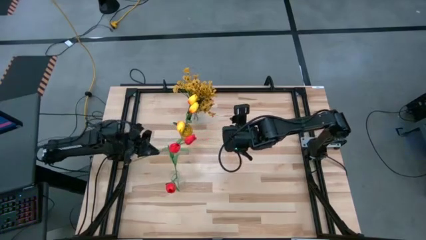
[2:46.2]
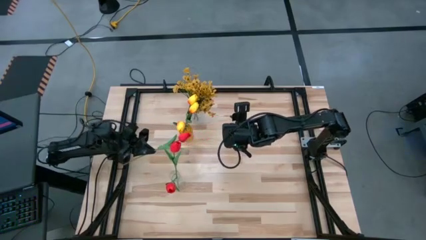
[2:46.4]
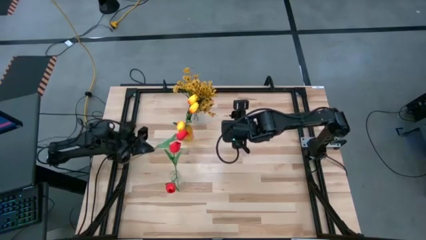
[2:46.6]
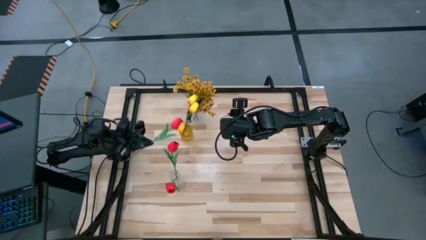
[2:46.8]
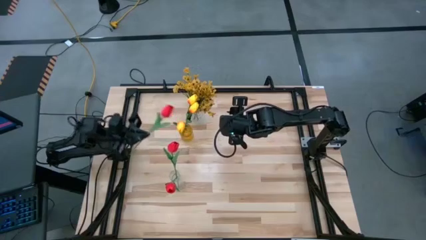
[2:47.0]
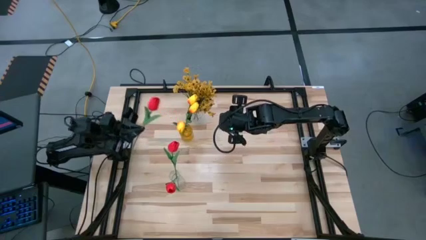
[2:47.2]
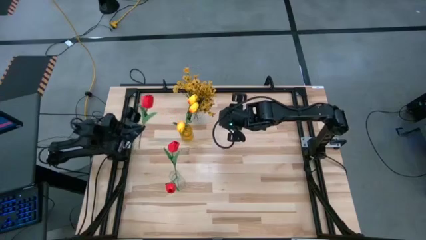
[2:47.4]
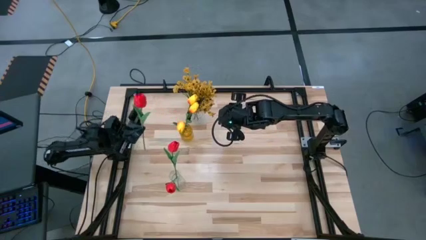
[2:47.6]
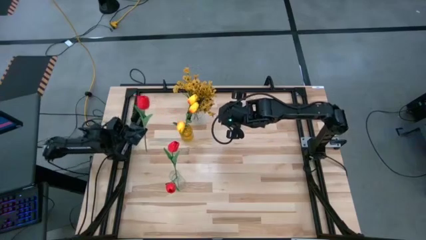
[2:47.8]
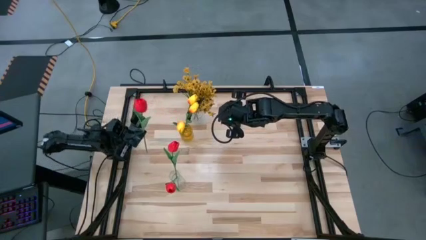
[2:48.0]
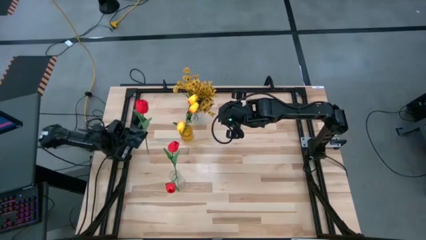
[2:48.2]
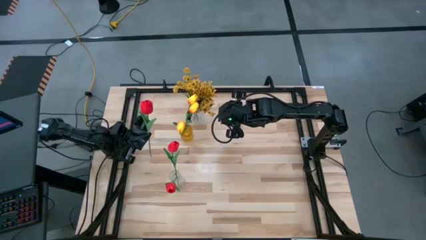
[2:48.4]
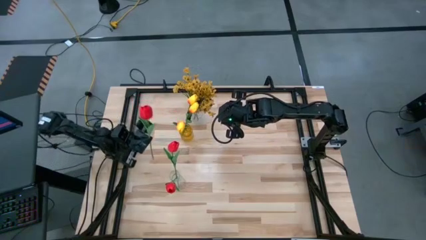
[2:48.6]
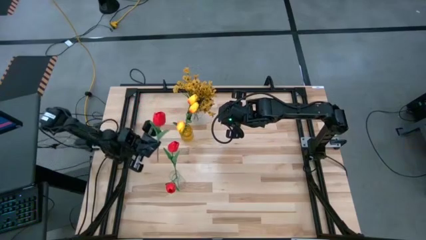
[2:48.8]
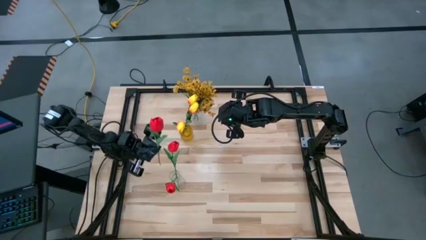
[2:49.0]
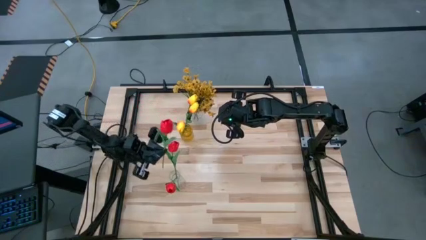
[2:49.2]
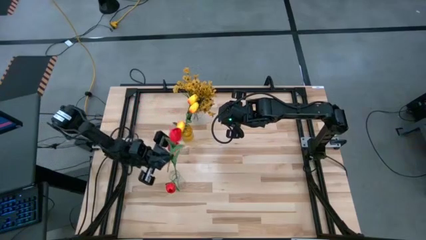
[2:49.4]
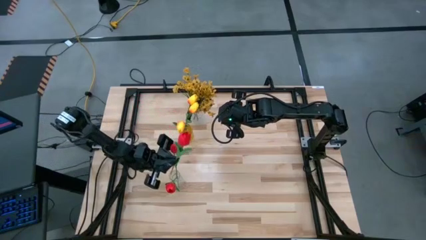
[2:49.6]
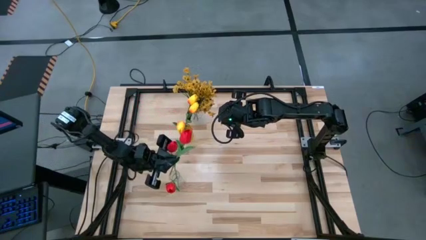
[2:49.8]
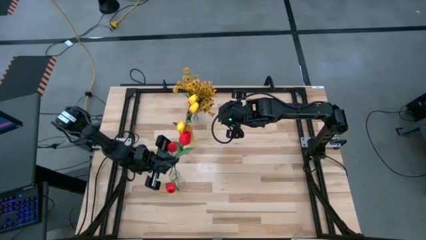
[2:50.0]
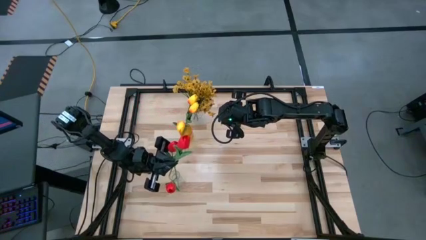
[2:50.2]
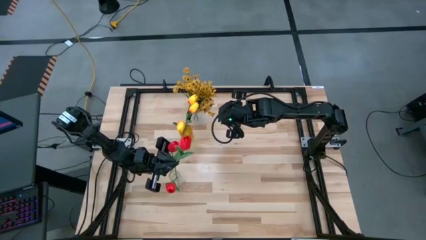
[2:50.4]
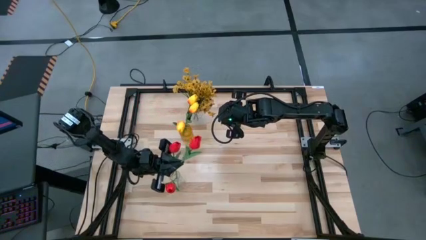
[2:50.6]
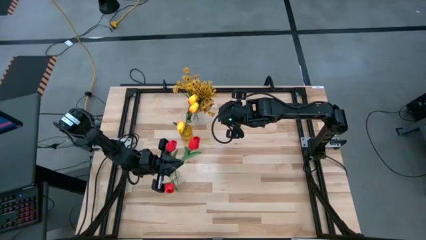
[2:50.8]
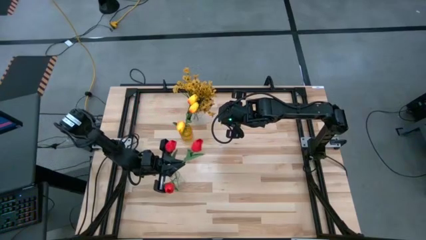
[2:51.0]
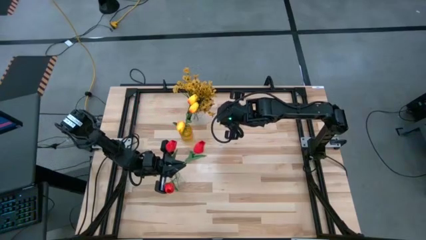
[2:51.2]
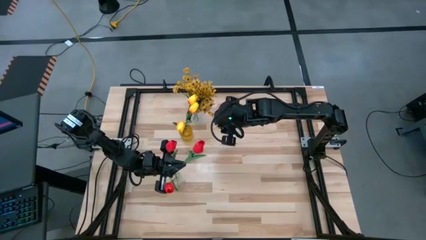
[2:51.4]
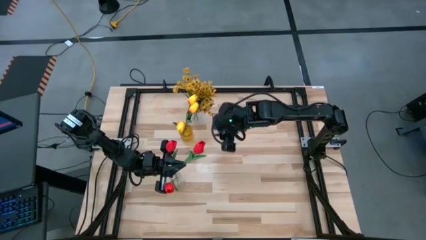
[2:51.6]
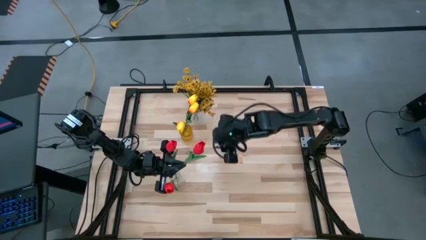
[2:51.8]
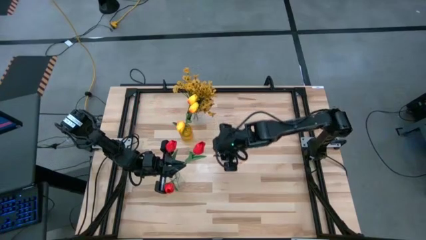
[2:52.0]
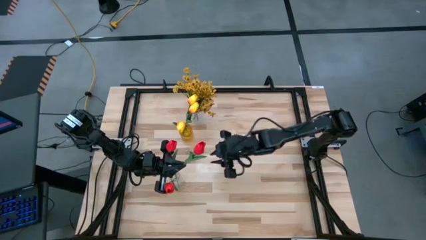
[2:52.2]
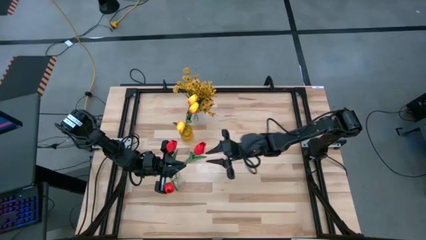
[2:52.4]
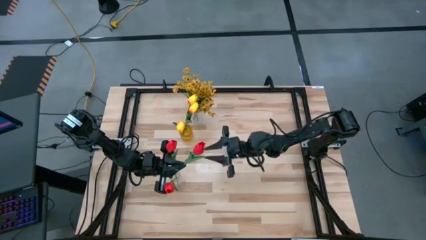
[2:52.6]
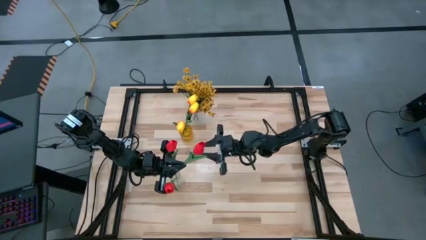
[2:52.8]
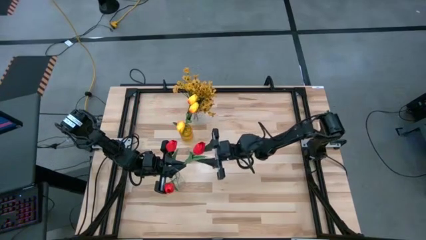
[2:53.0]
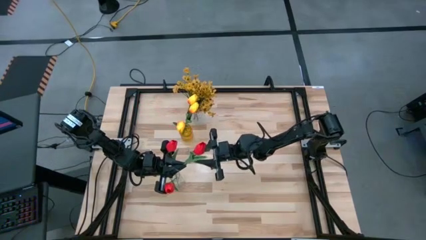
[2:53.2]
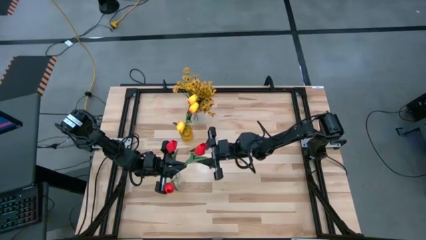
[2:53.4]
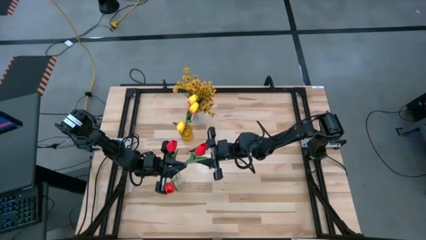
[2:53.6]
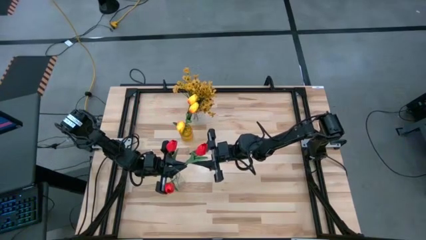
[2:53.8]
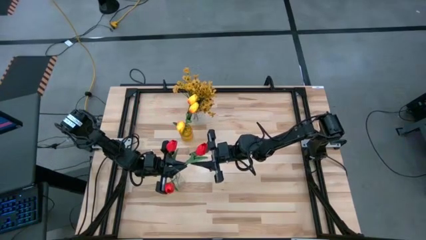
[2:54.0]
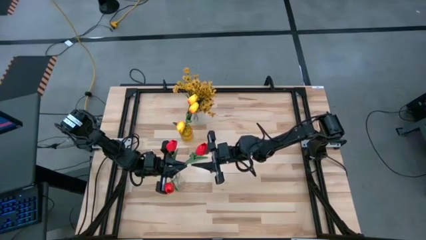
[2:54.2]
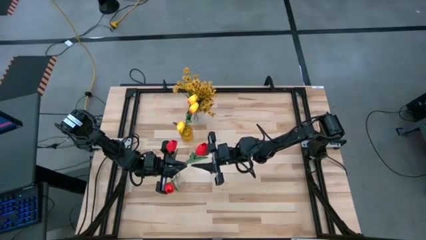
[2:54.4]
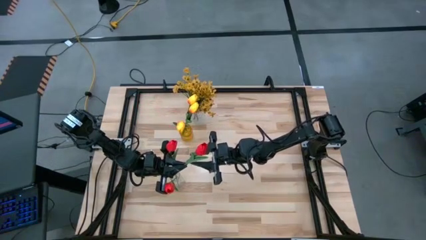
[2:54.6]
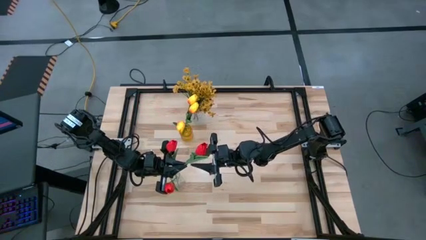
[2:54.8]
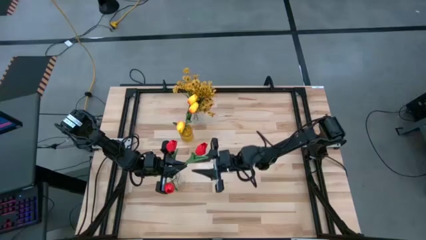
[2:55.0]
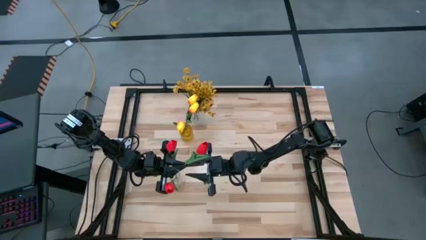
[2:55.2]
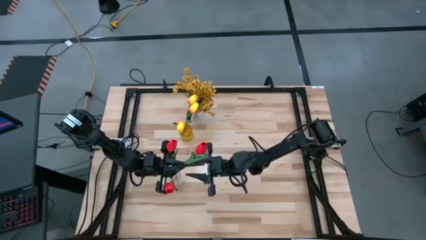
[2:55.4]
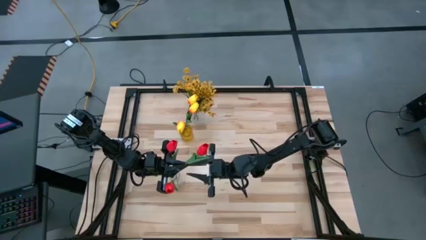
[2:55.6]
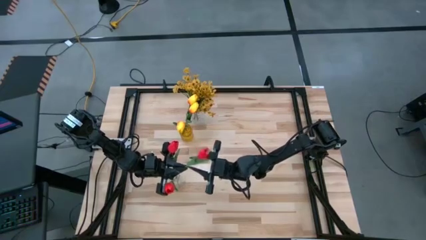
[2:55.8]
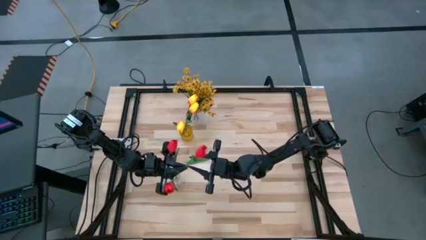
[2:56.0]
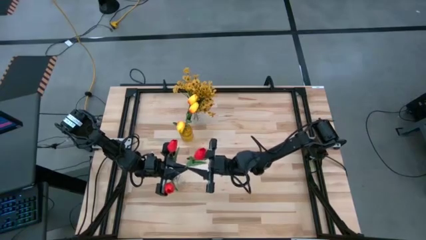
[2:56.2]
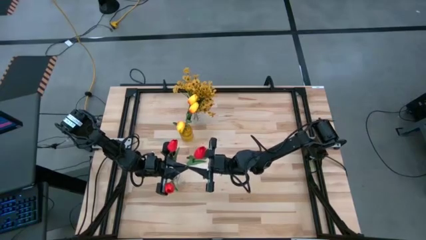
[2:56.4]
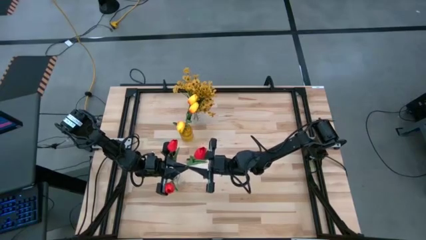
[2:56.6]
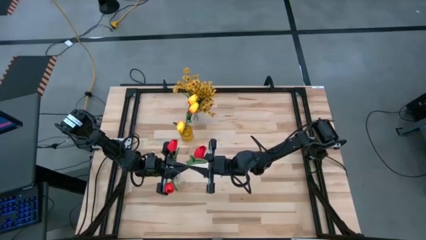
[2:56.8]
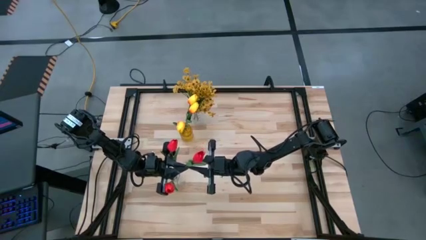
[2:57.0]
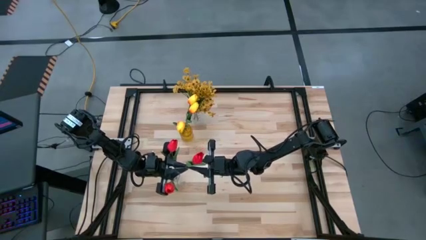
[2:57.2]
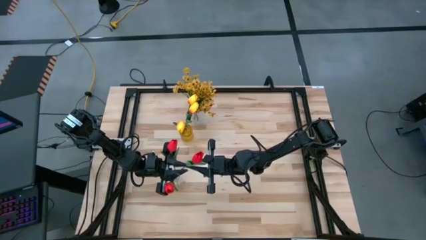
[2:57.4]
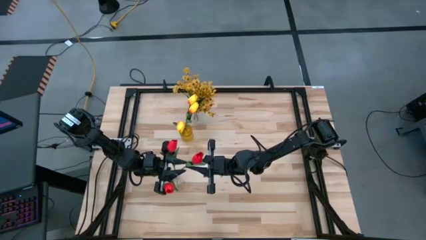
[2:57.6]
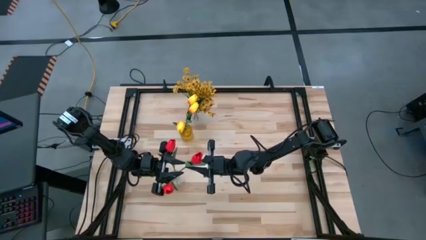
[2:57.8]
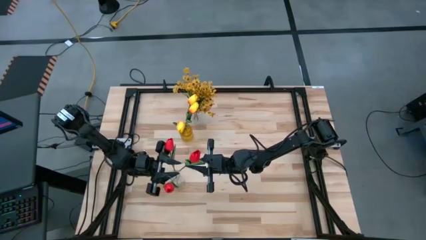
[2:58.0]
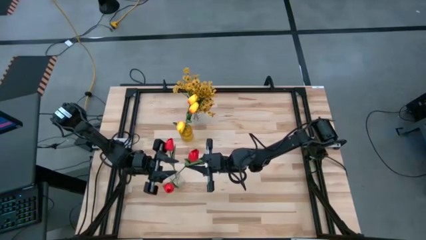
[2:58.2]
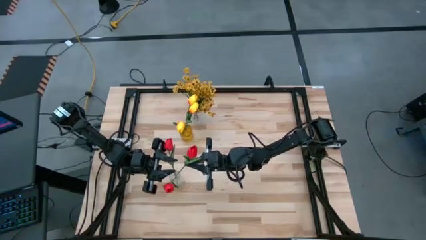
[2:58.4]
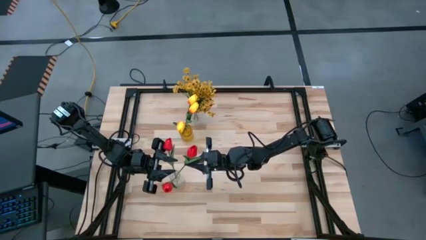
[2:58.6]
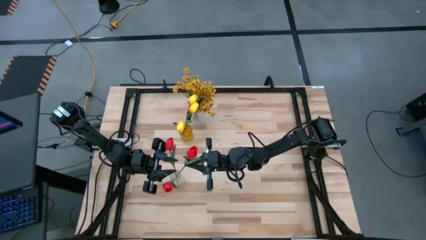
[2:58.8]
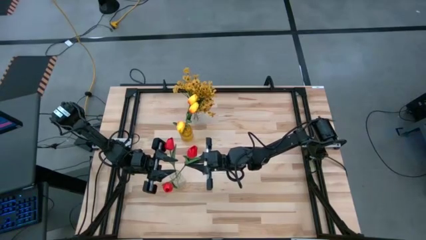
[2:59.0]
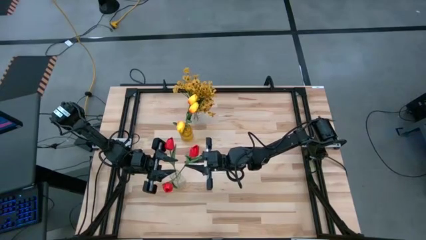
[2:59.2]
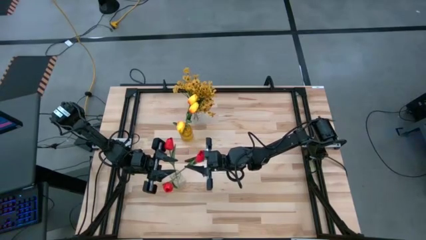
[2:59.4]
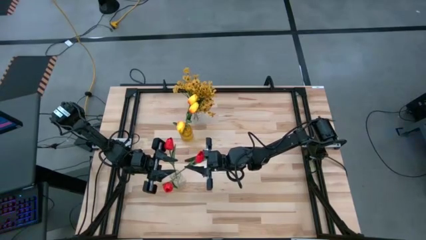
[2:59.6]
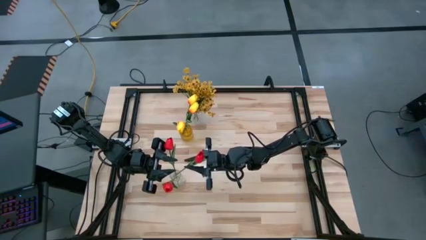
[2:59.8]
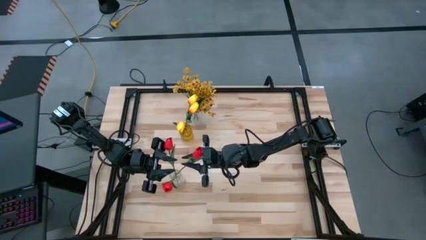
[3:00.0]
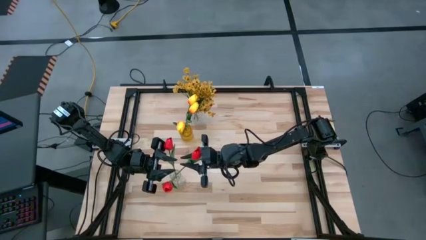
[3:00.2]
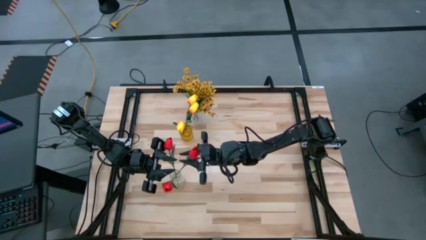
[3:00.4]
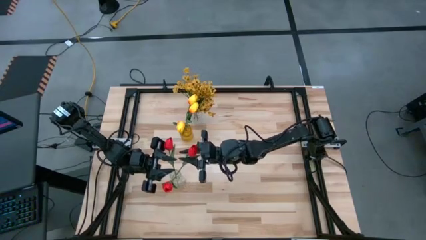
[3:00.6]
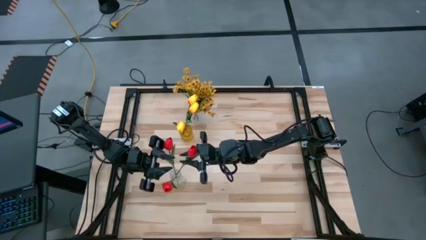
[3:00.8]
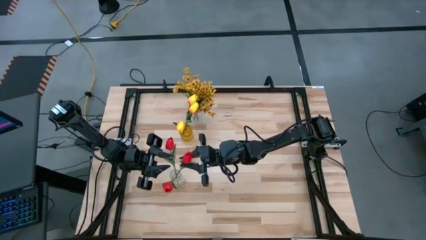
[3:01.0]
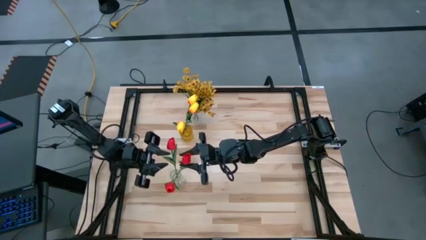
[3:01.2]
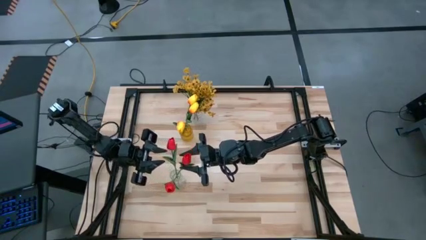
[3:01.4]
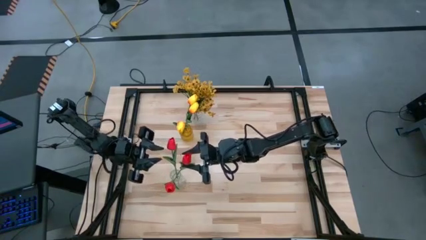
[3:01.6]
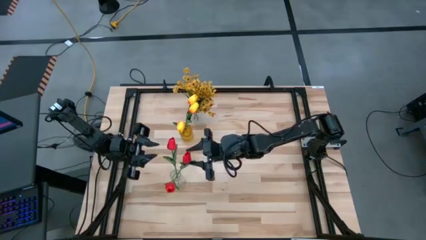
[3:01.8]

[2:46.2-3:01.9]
Task: Sort flowers into vase by color
Put the red tulip into the bottom transparent vase

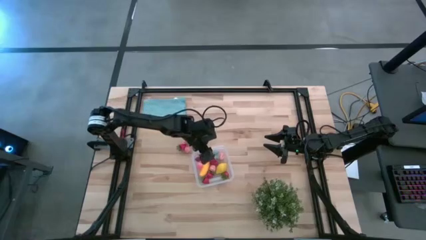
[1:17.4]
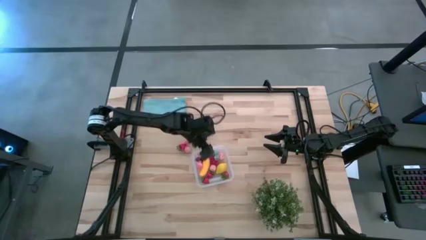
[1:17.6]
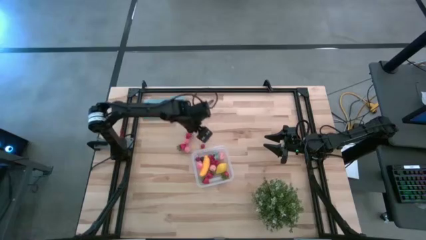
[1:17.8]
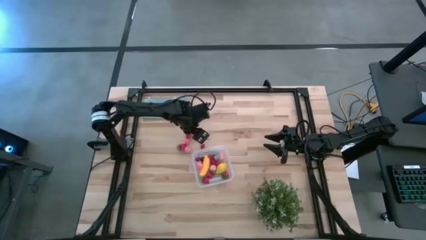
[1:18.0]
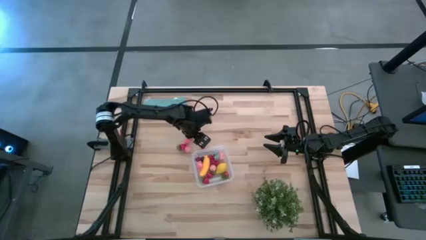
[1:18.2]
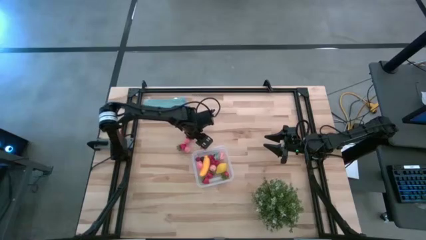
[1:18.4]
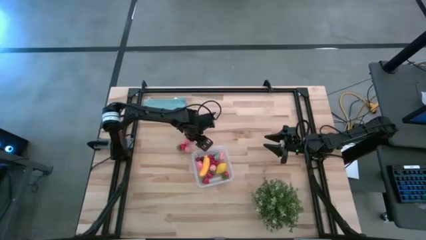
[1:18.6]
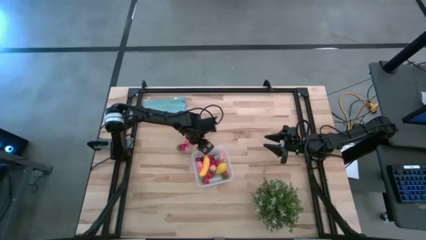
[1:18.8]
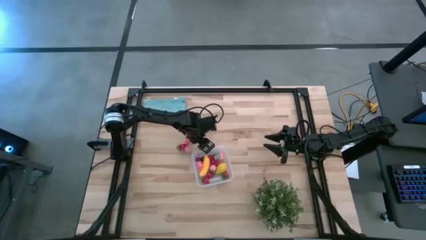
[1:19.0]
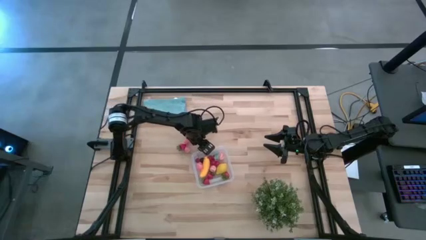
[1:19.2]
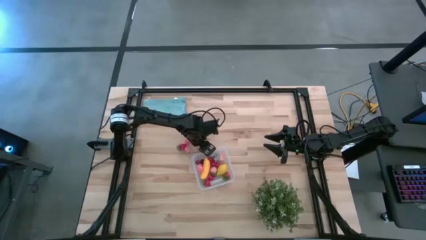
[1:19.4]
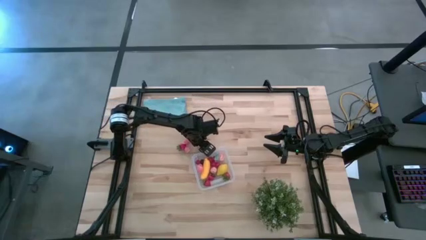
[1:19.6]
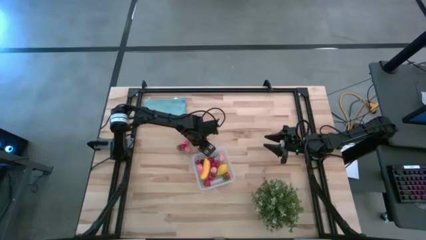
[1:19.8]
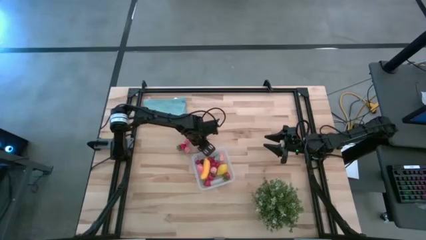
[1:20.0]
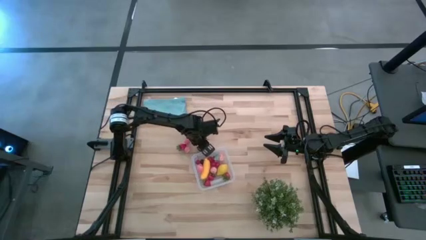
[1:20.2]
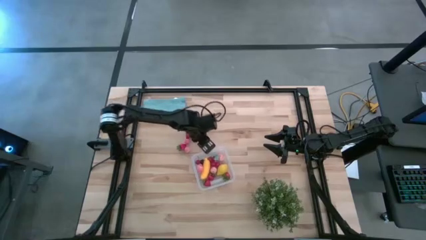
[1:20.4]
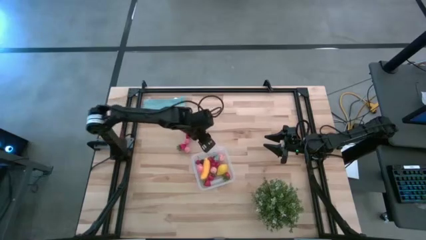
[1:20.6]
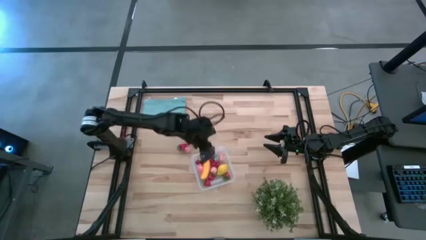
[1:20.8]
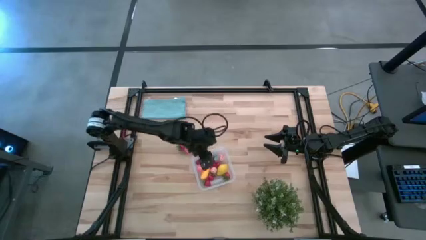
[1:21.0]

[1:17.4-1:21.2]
Task: Pick and placing Produce into tupperware
Put the red cherry into the transparent bin
